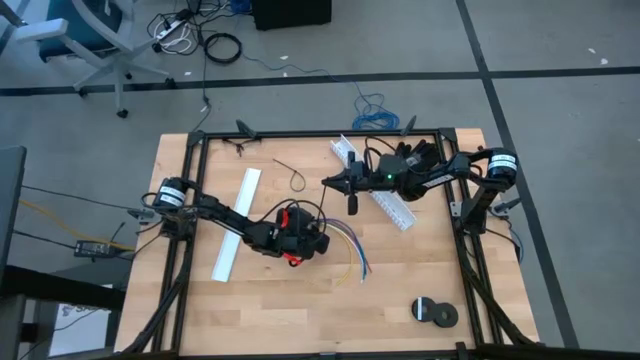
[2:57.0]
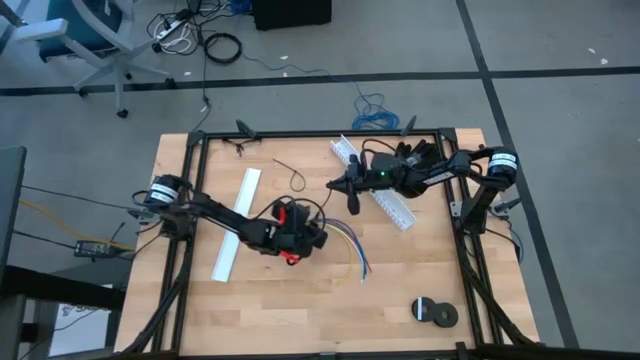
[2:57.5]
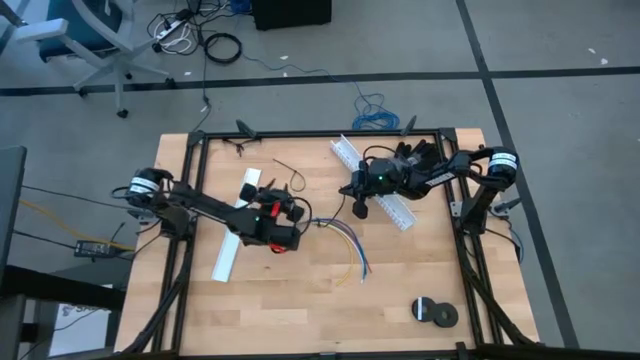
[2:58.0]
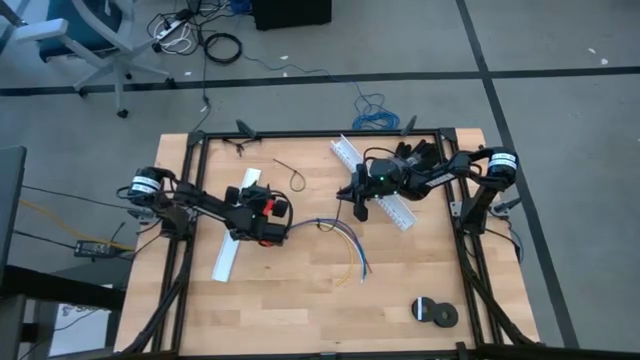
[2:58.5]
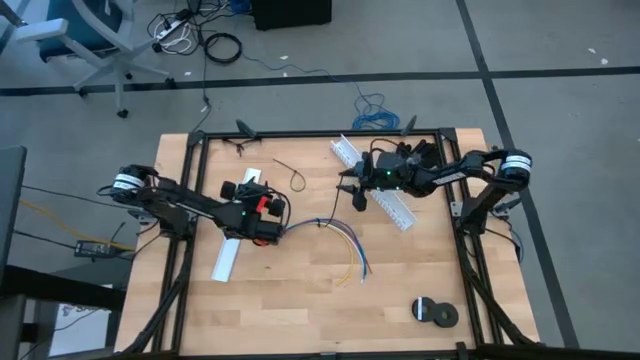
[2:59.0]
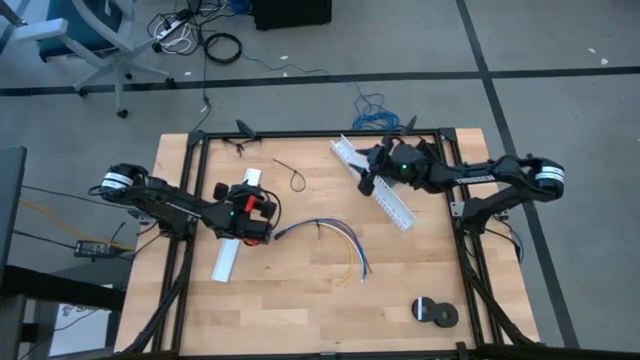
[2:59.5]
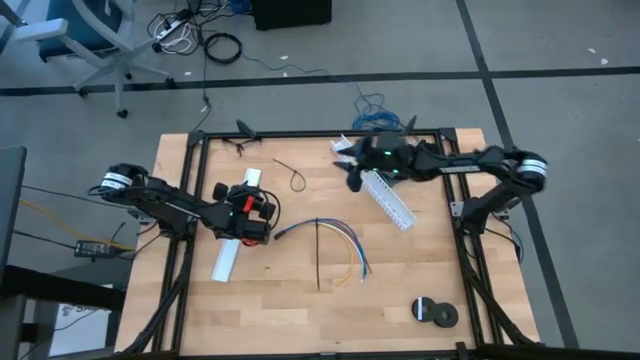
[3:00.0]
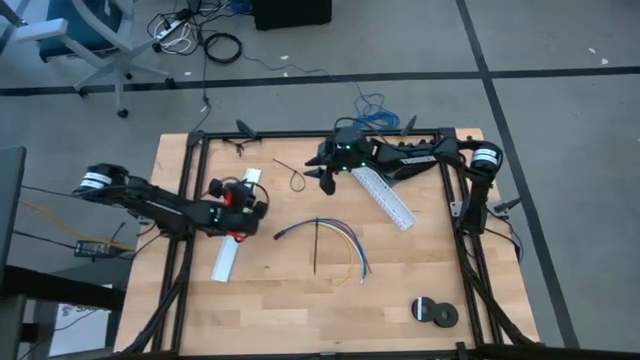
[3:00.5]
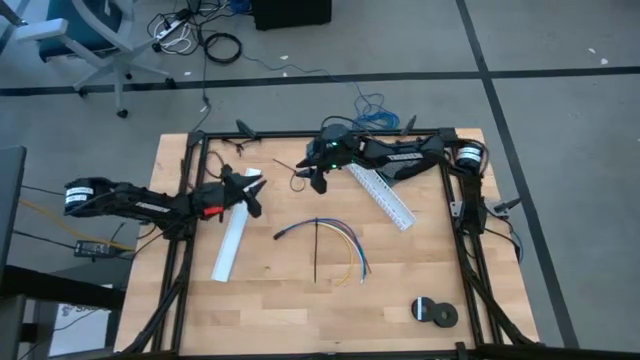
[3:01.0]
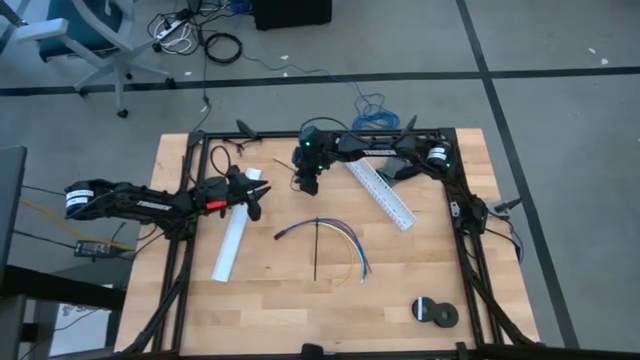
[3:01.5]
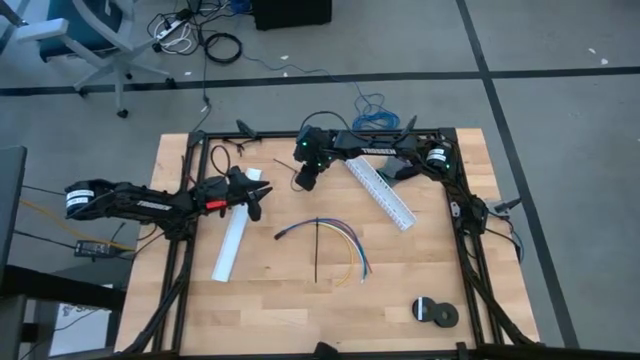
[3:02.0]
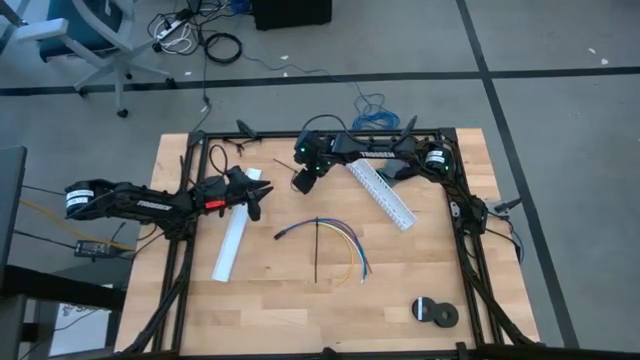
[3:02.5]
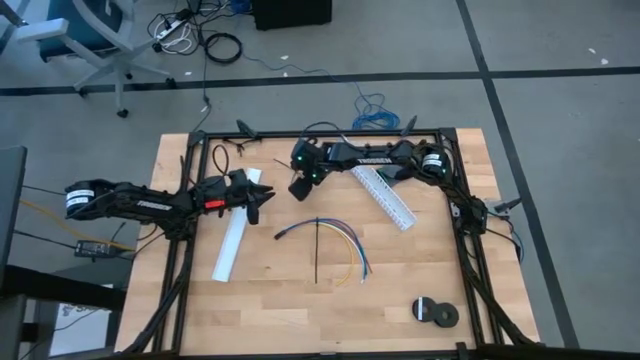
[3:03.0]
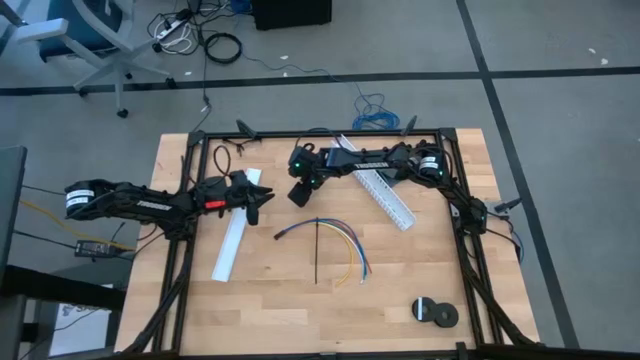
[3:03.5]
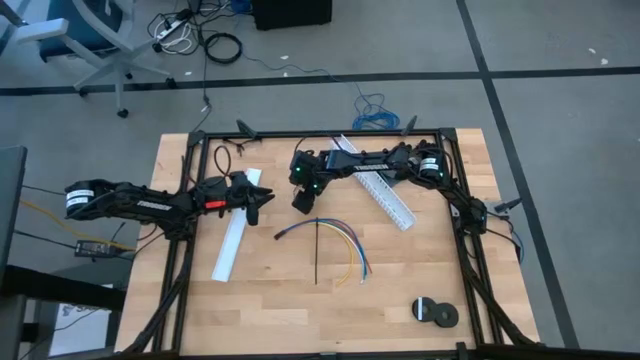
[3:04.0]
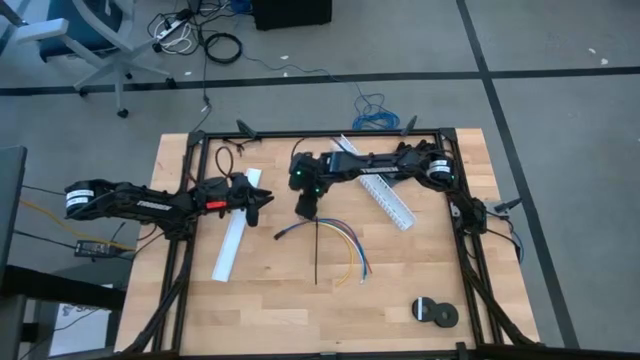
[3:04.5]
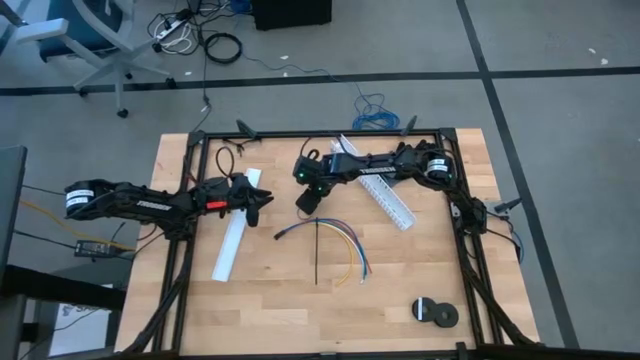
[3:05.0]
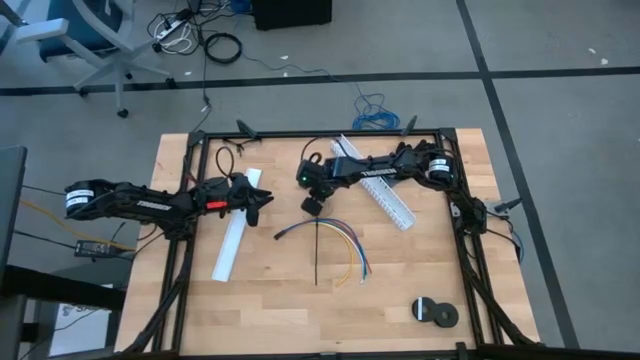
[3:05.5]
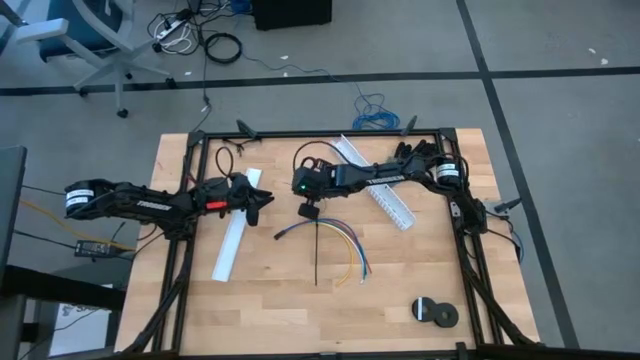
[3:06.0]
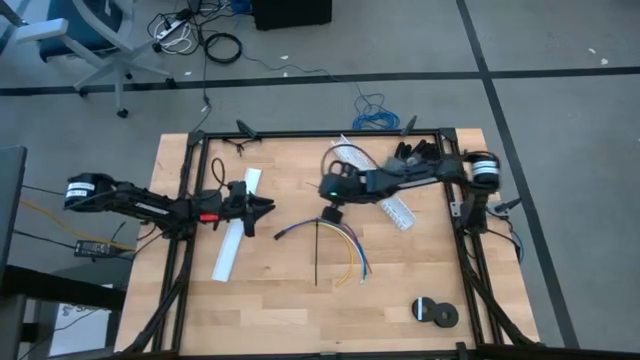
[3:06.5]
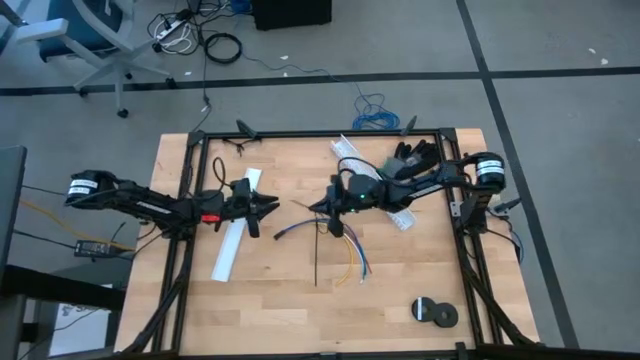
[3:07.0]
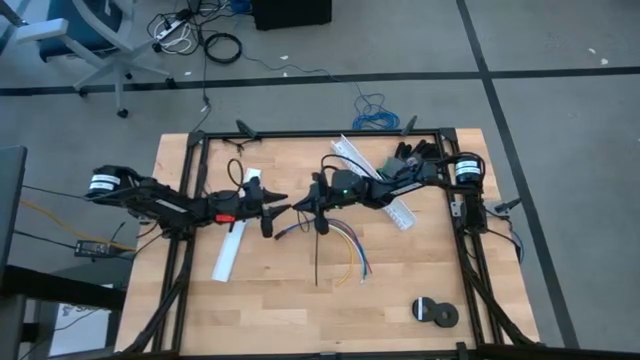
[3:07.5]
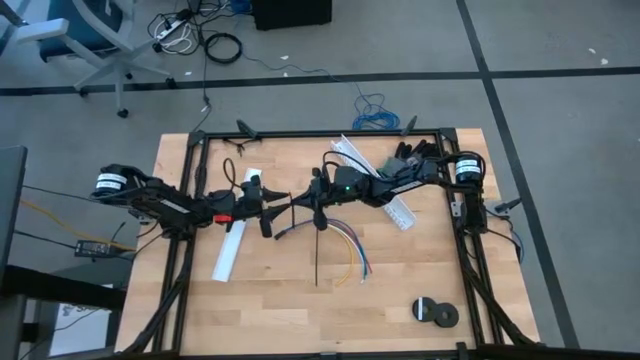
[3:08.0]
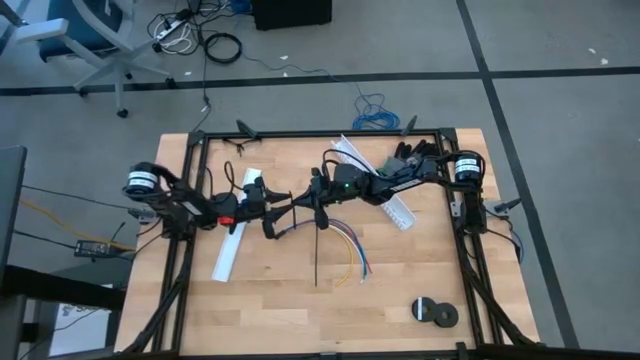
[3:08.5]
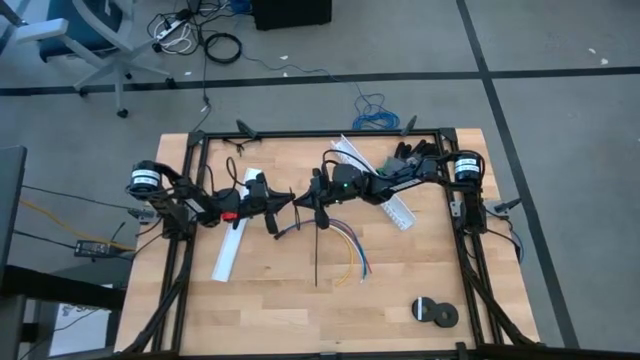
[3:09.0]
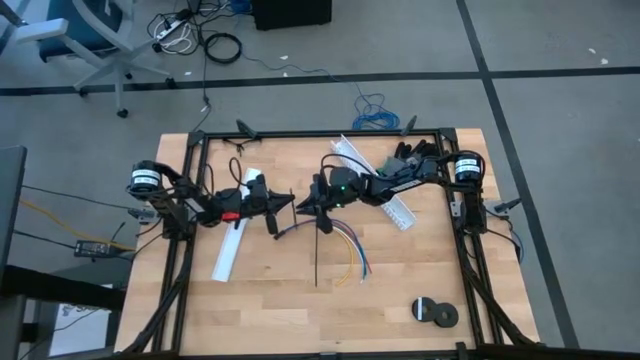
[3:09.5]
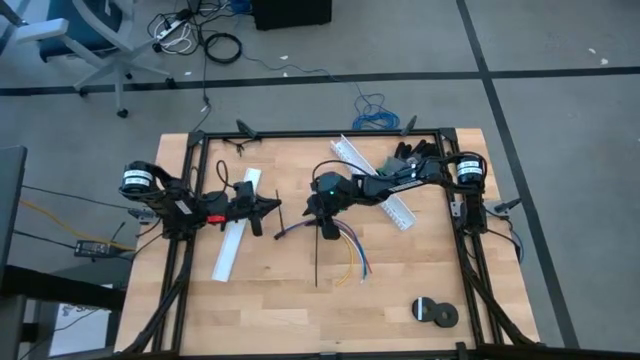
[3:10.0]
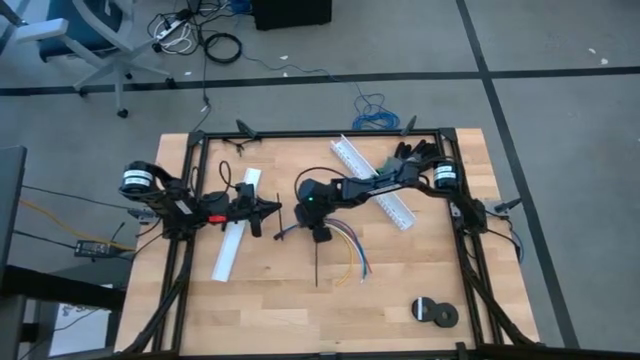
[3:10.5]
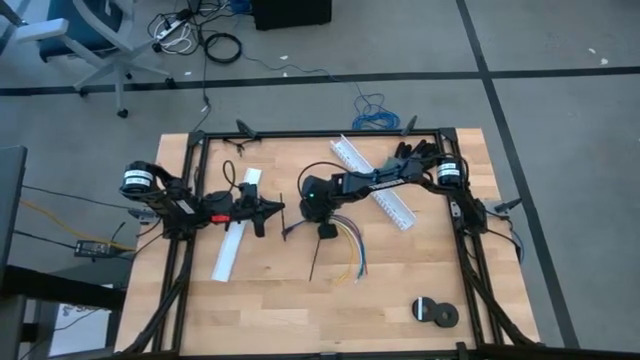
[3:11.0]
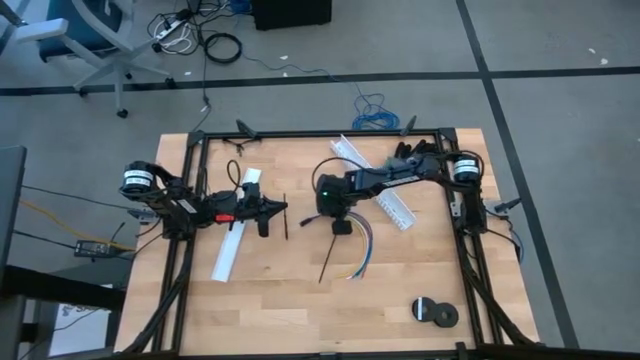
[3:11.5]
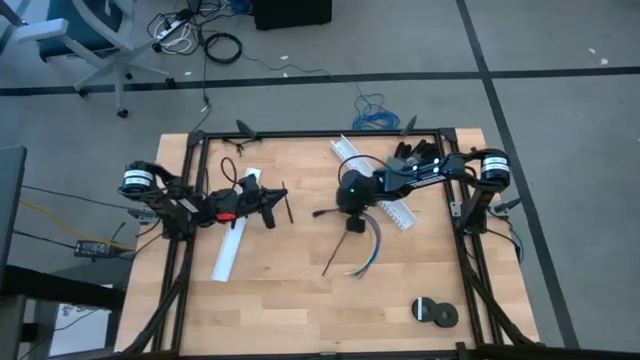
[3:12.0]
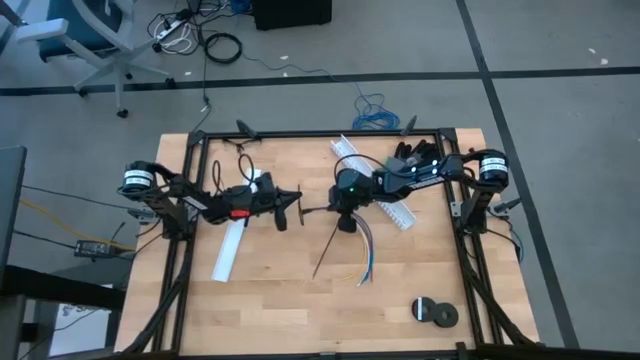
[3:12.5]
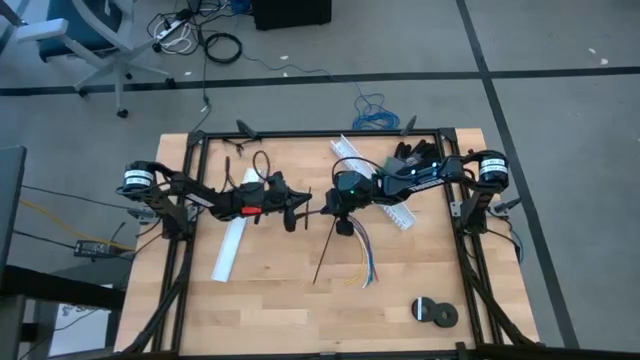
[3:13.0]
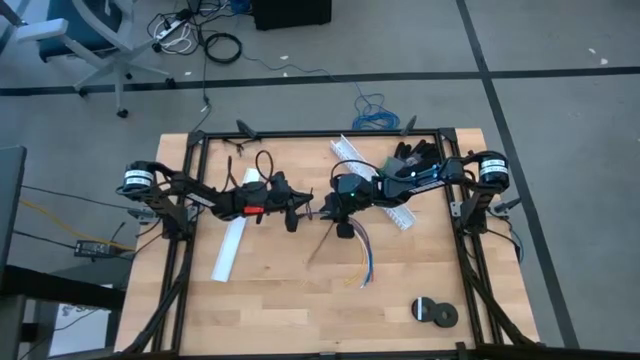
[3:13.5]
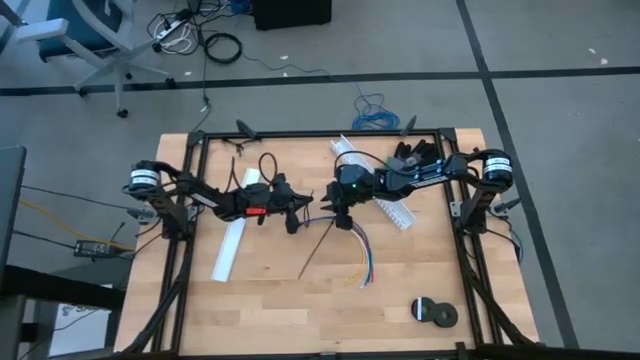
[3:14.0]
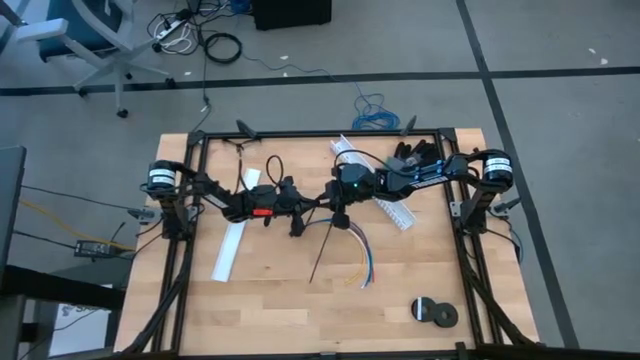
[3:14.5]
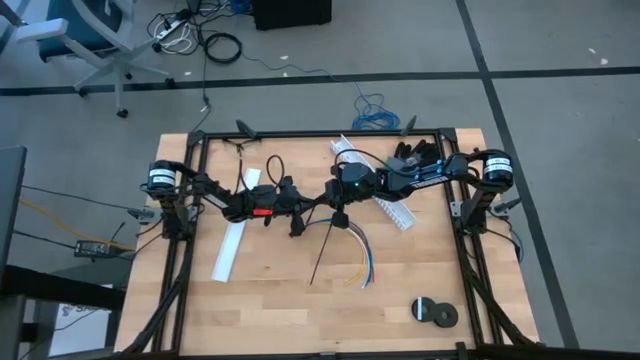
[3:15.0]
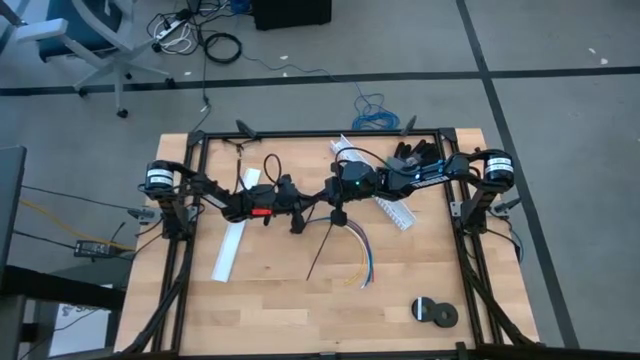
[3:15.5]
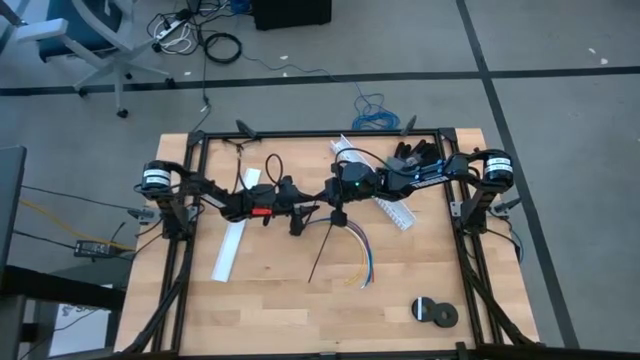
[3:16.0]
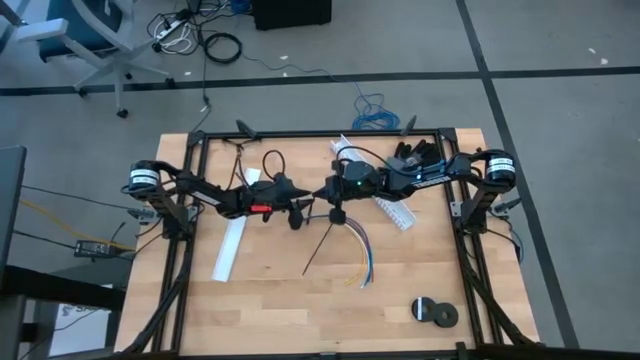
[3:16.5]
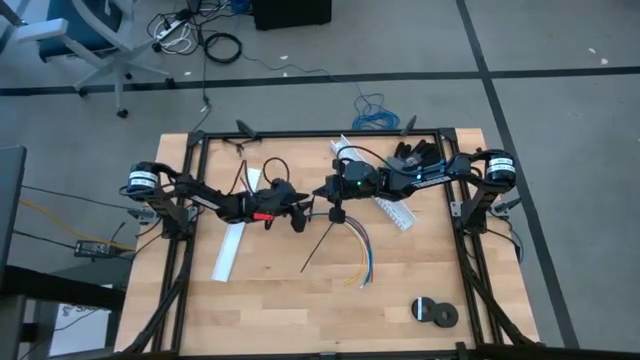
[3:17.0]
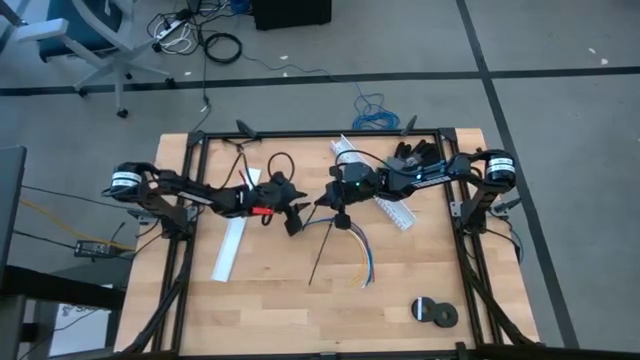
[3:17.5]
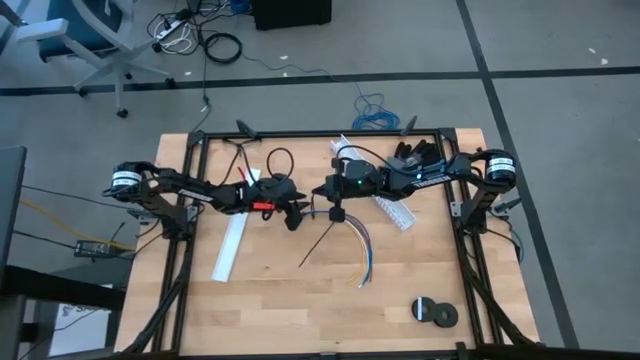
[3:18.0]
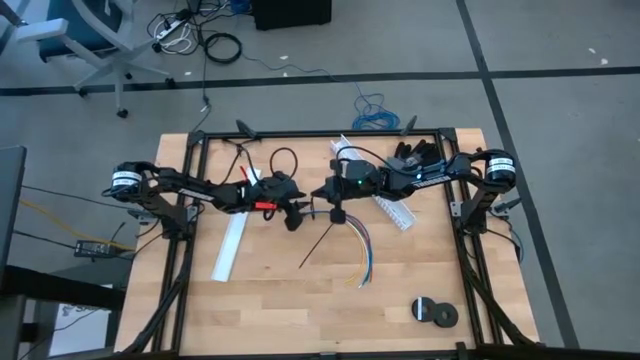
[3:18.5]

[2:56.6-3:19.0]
Task: Ziptie cables
Wrap the cable wires with black zip tie

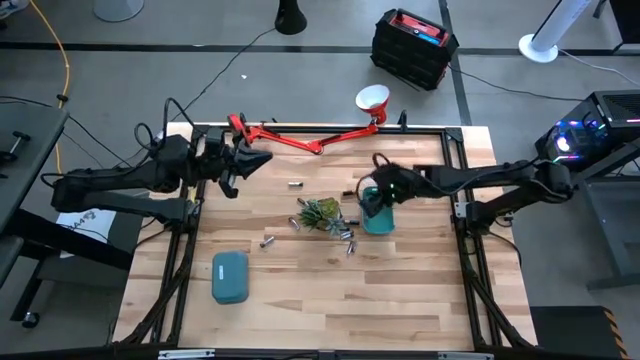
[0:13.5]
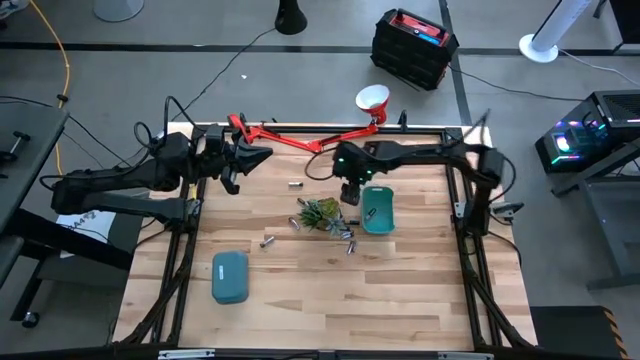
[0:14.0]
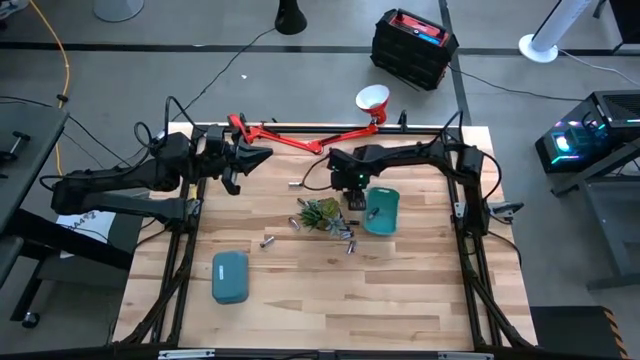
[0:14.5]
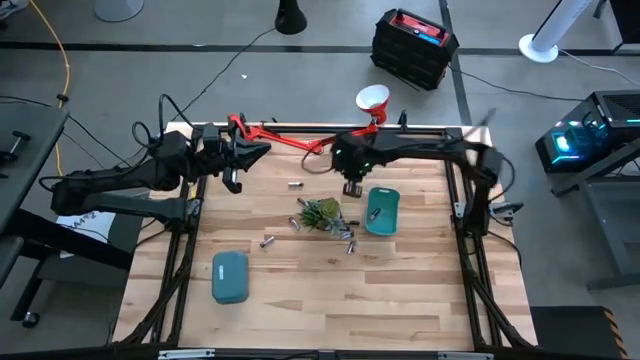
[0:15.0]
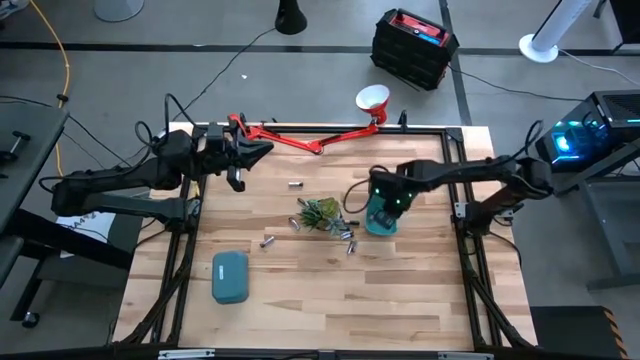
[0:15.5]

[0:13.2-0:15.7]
Task: Sort batteries
Put the black battery into the green bin
